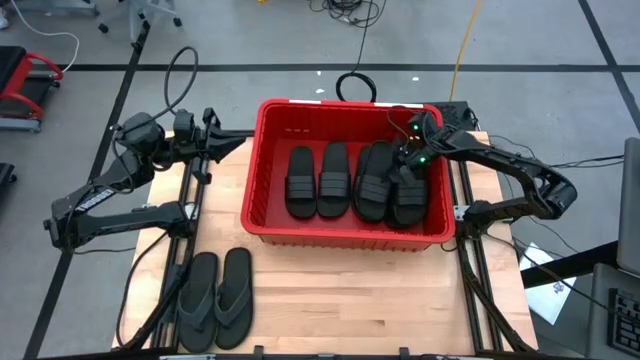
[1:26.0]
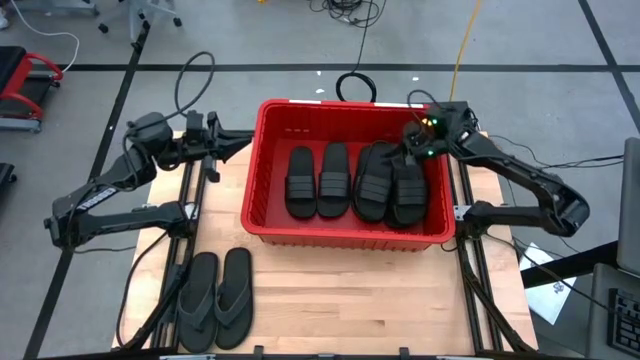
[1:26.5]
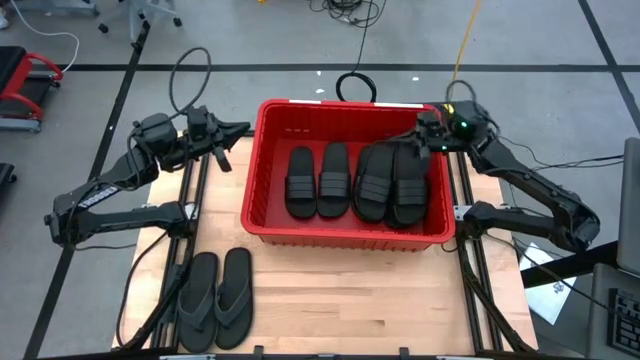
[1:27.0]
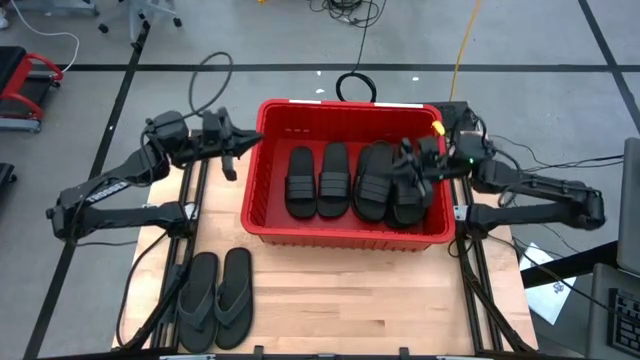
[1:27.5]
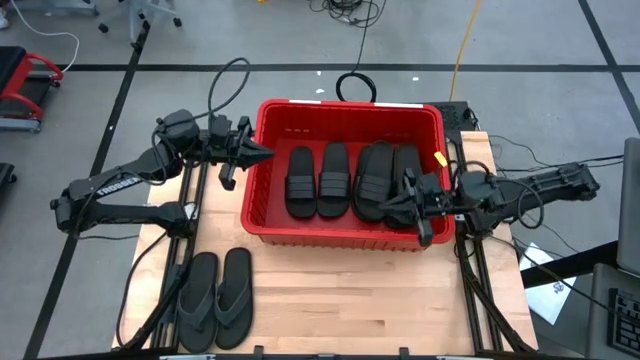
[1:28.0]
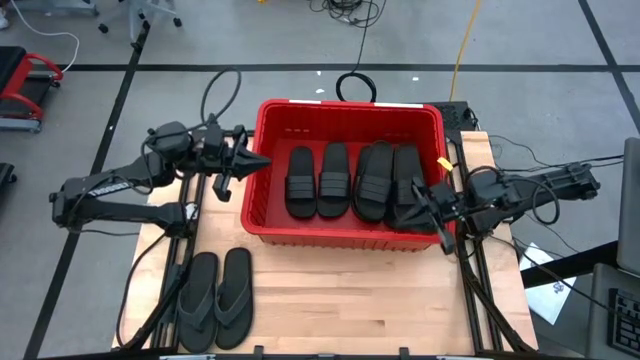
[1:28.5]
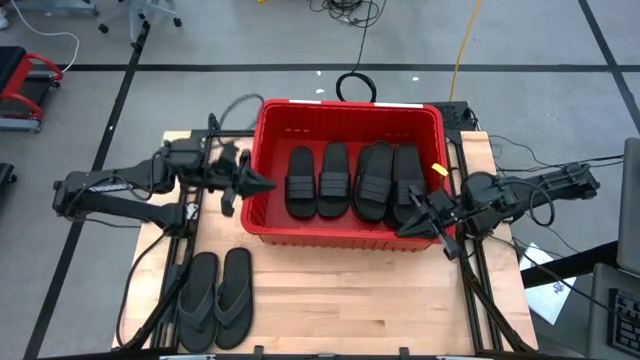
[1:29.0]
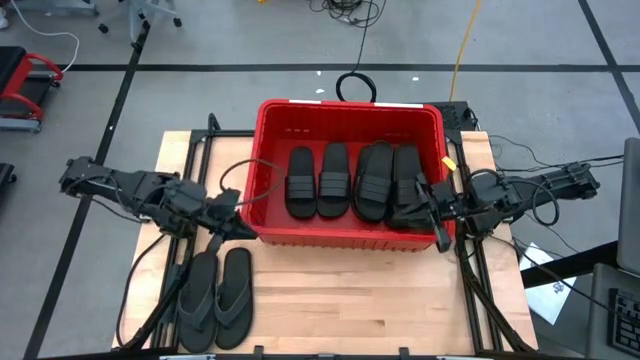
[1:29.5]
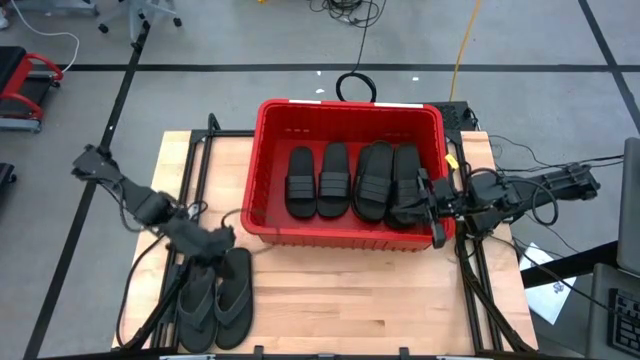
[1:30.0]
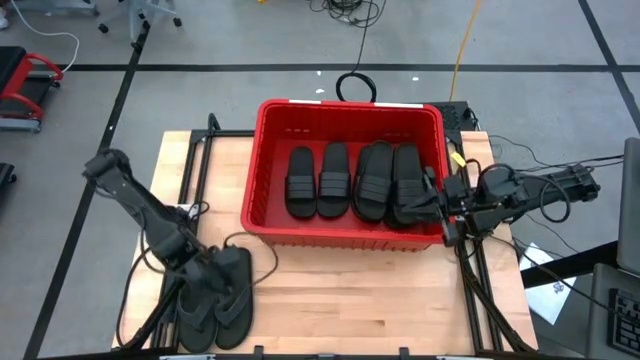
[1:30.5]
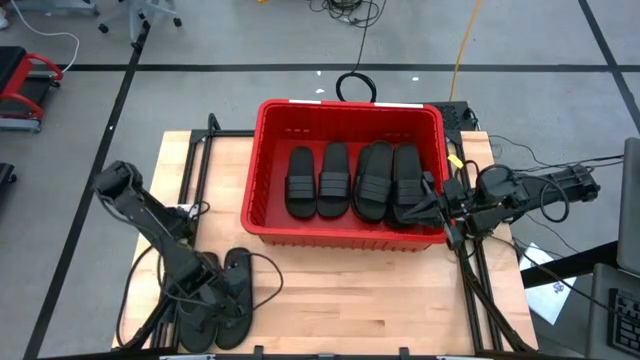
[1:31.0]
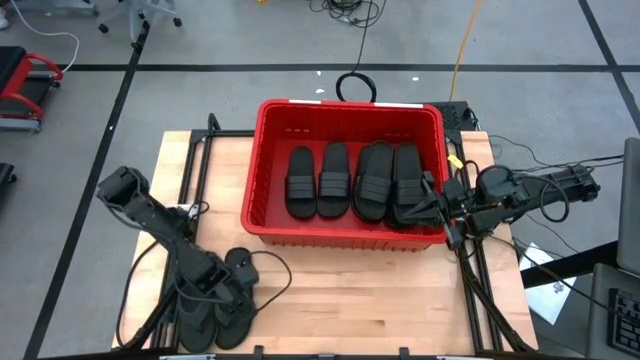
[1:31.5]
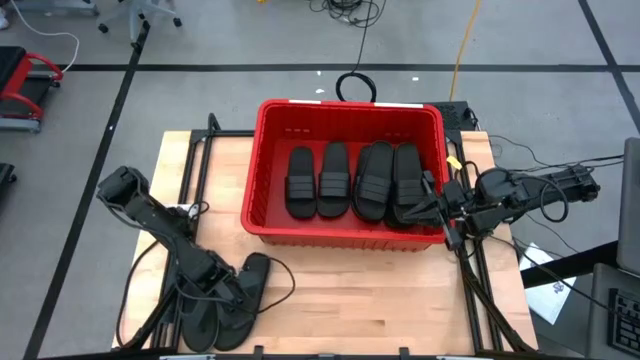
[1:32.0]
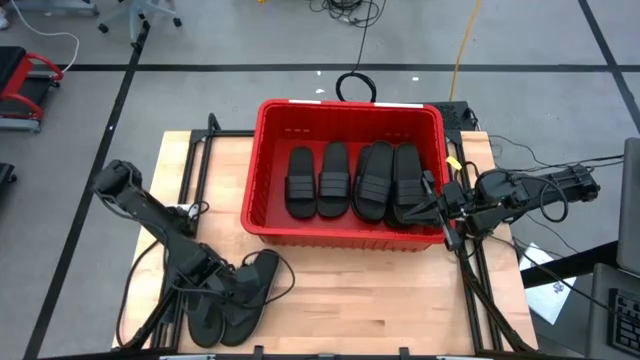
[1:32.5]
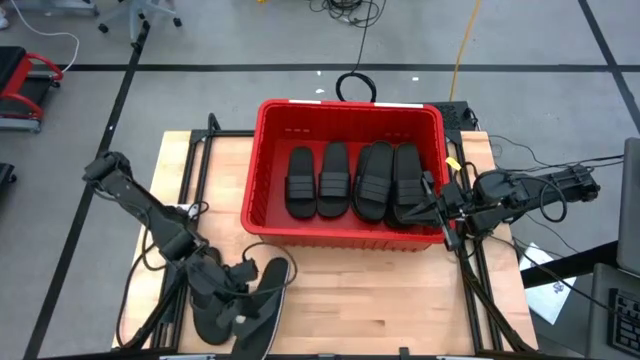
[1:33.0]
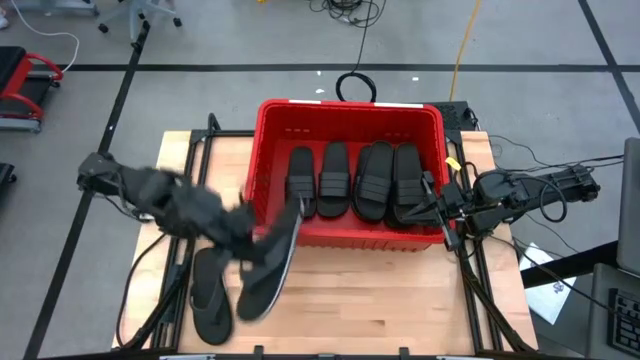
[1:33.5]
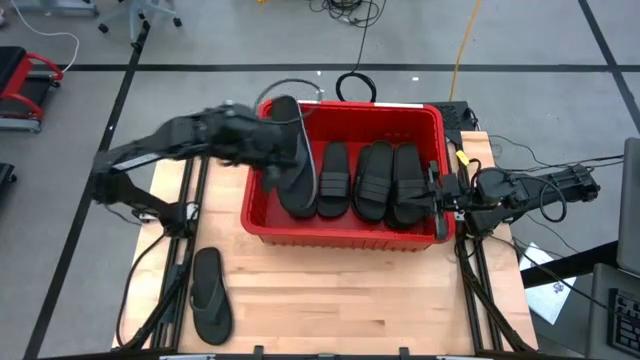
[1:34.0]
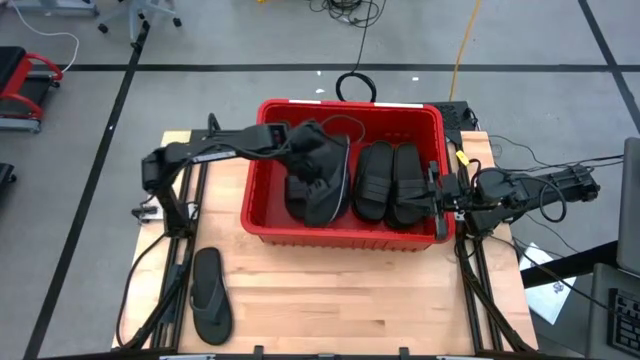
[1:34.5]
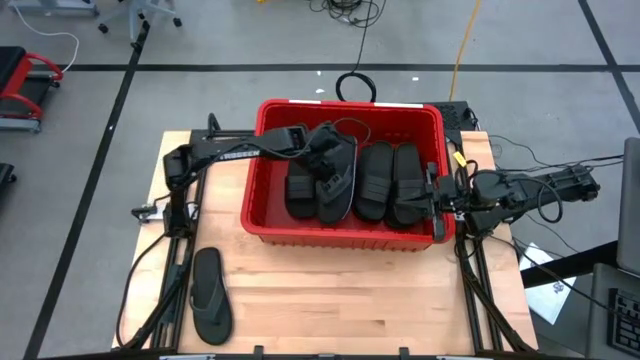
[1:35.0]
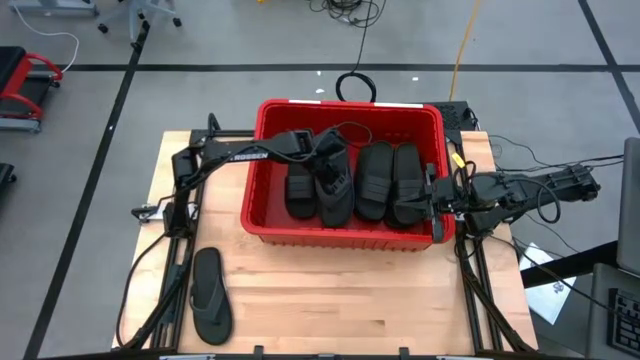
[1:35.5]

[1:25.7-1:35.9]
Task: Pick and place slides into bin
Put the right black flip flop into the red bin

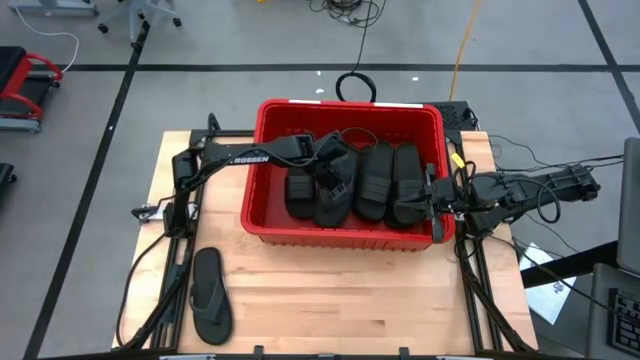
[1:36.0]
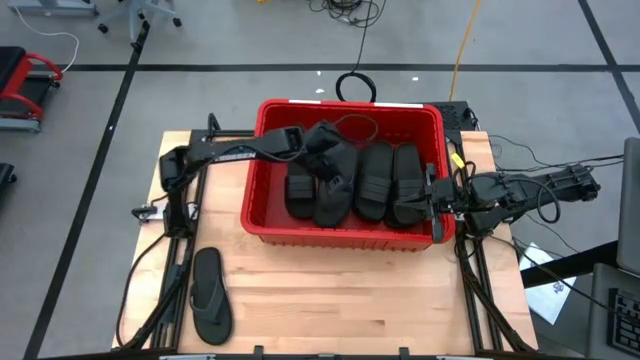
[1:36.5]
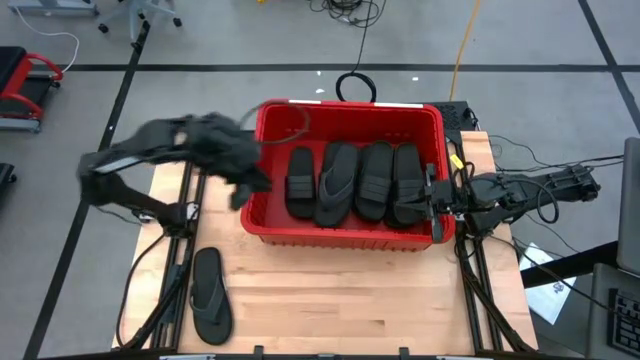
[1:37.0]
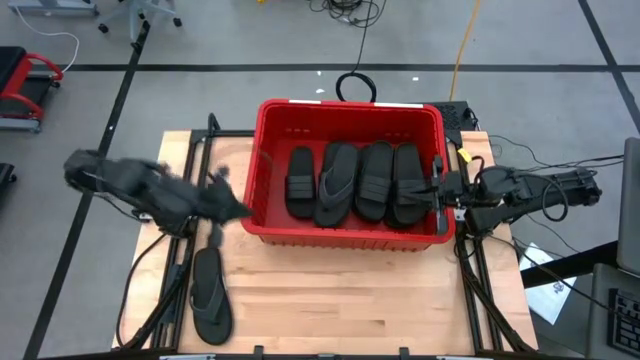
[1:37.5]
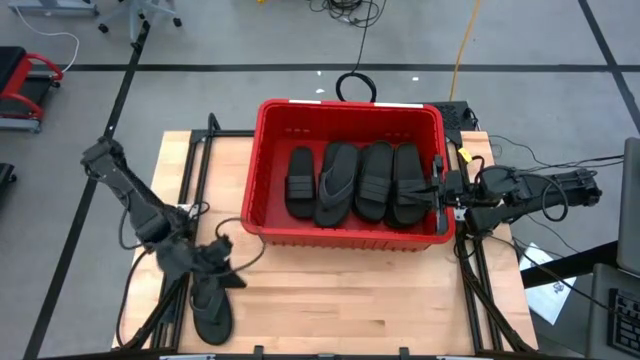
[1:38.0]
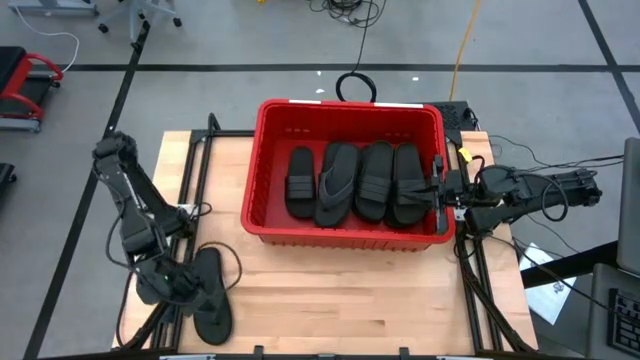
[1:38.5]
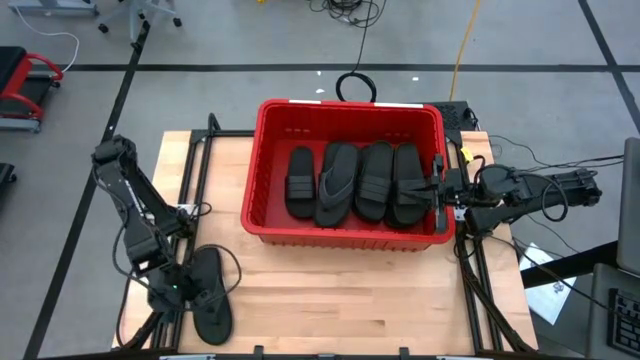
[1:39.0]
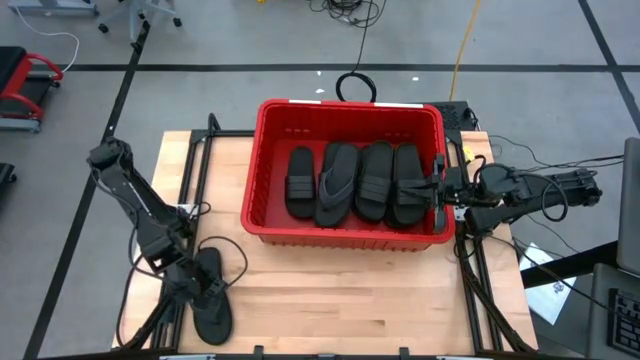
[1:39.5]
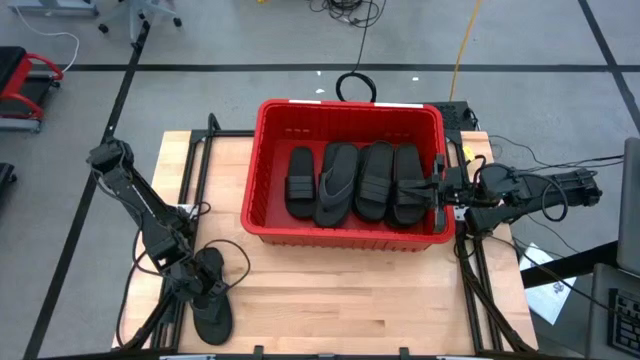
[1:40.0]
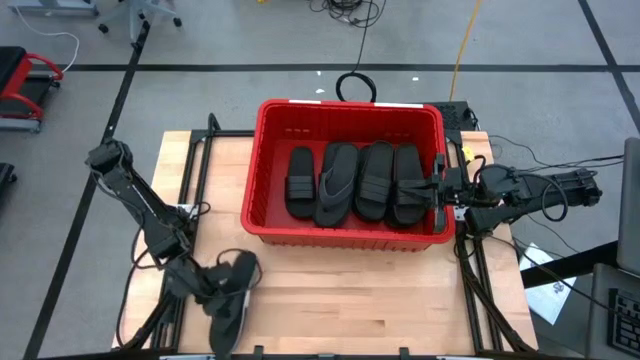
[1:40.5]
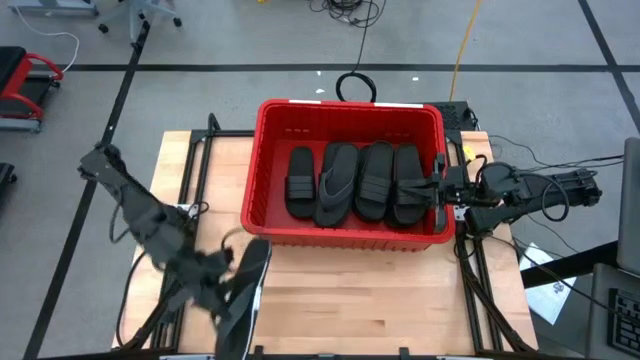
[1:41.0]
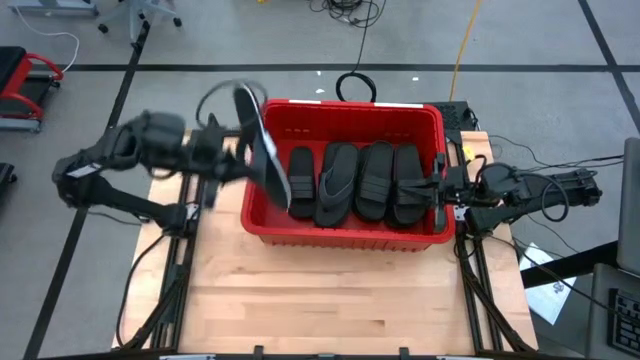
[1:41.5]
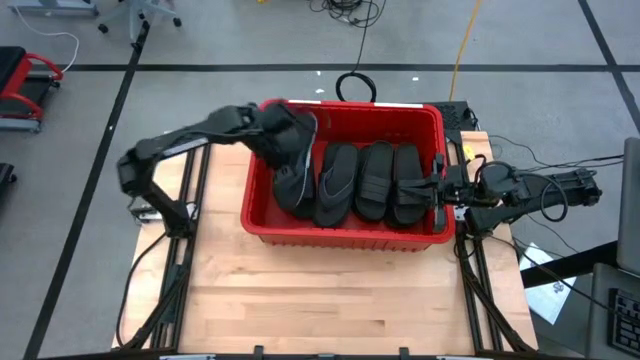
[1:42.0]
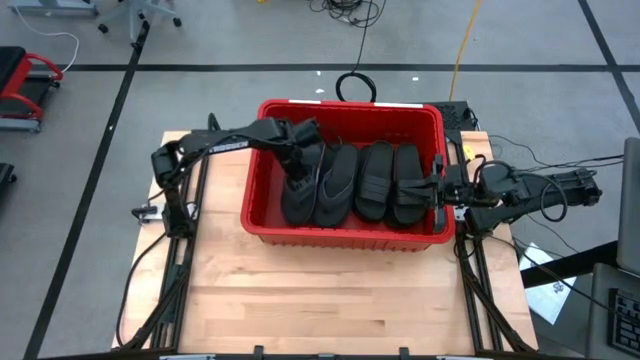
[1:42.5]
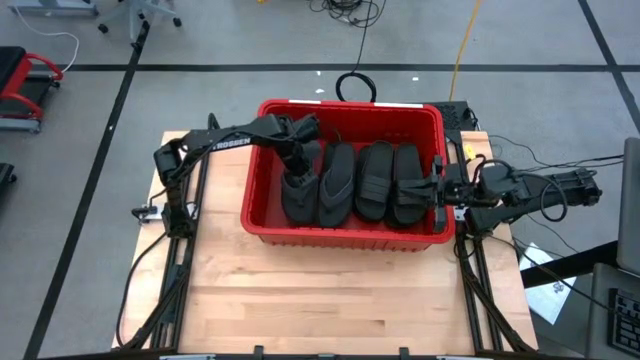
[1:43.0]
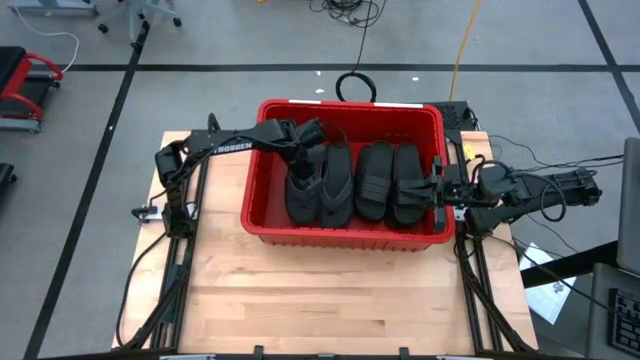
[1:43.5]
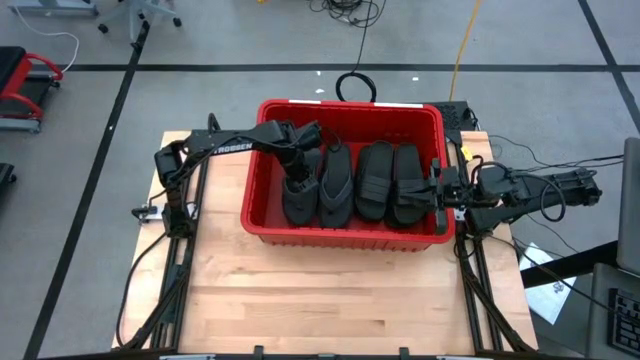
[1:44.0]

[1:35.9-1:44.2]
Put the left black flip flop into the red bin

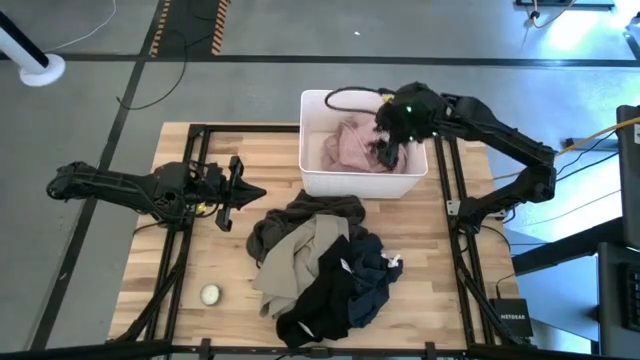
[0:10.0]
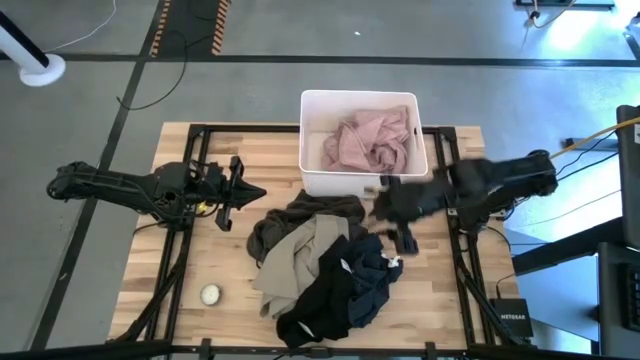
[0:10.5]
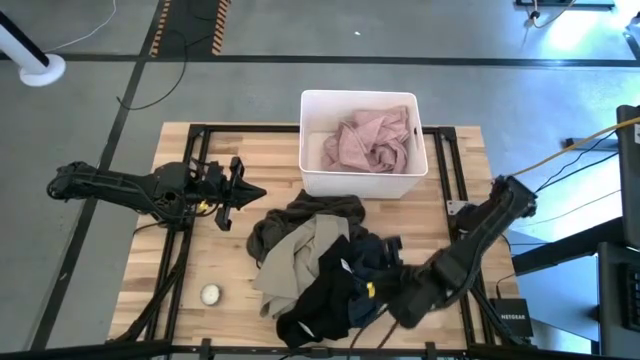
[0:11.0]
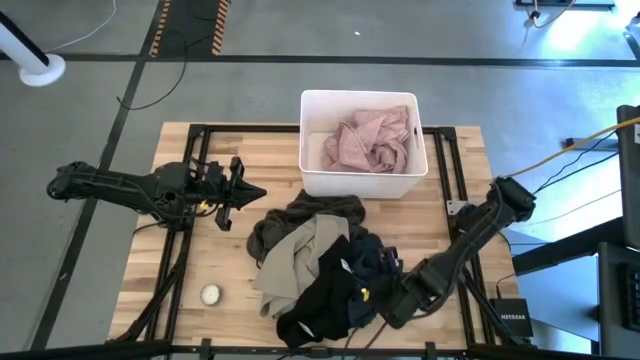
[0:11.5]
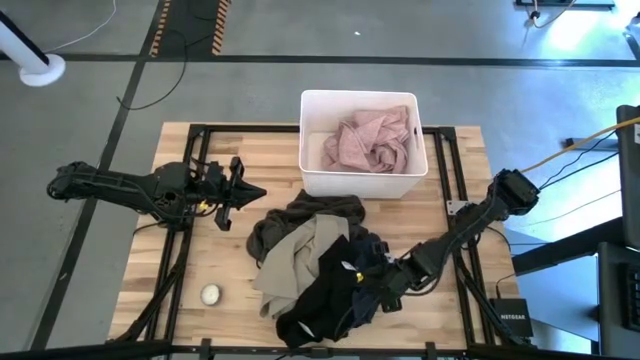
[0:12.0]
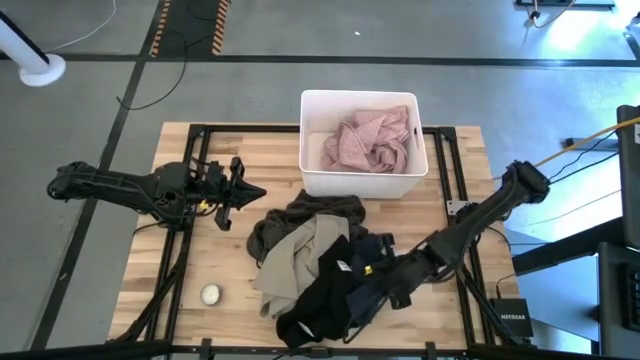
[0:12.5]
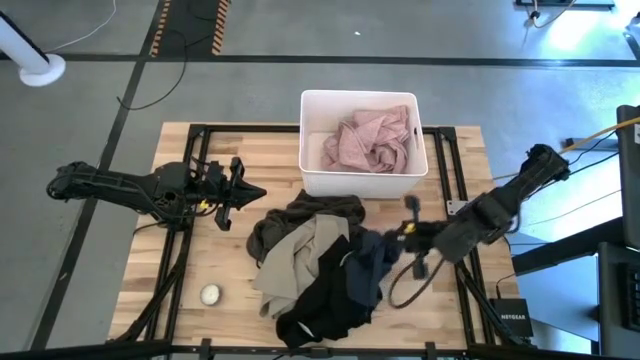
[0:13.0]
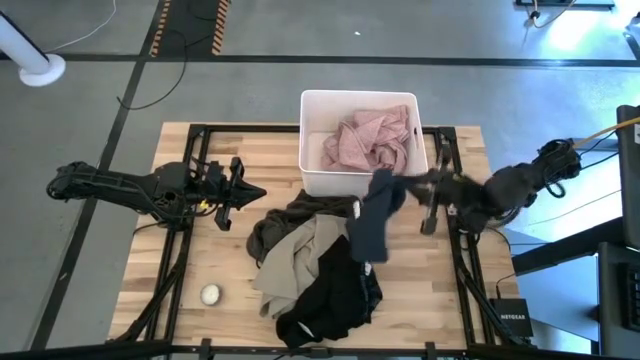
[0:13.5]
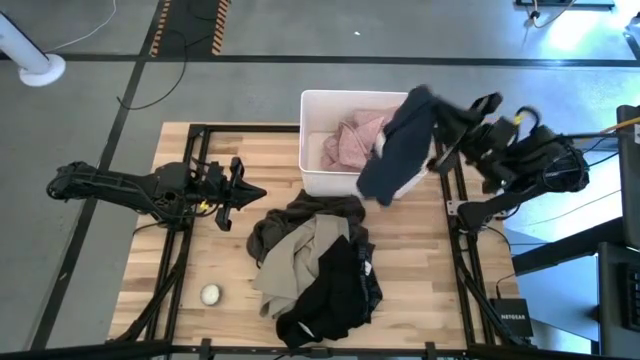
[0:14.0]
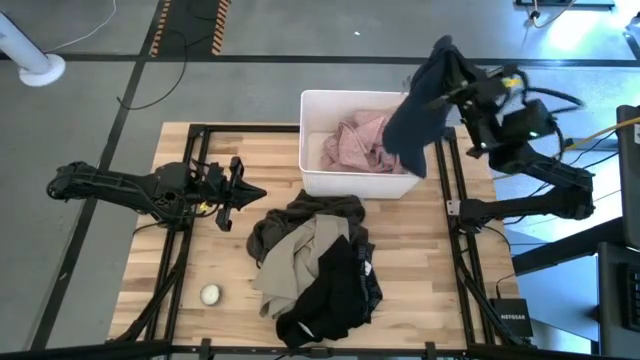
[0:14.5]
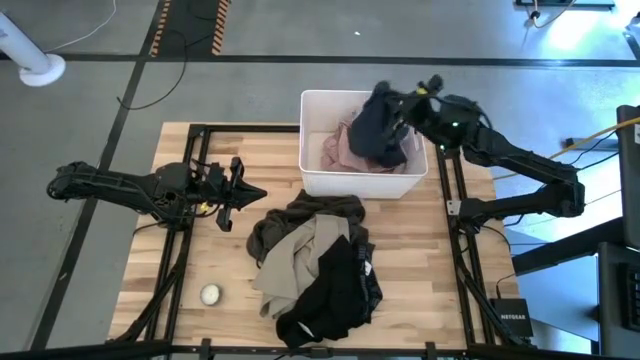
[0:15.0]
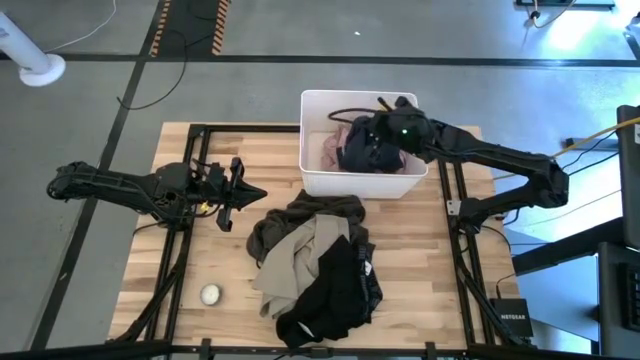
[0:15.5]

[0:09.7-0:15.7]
Task: Sort clothes
Put the dark blue shorts into the white laundry bin
